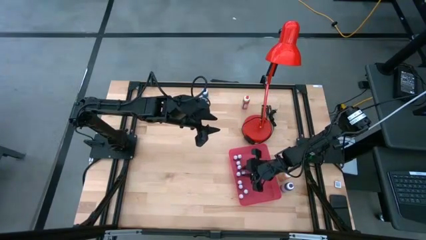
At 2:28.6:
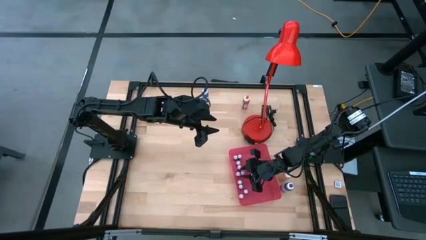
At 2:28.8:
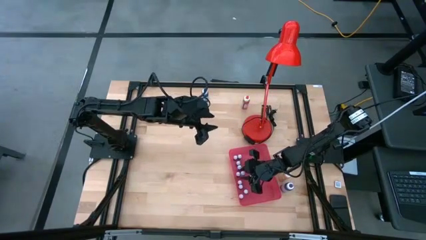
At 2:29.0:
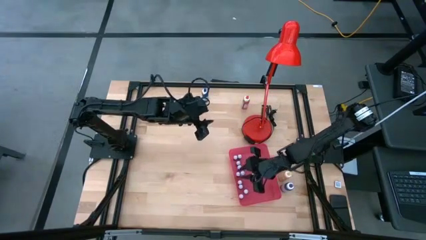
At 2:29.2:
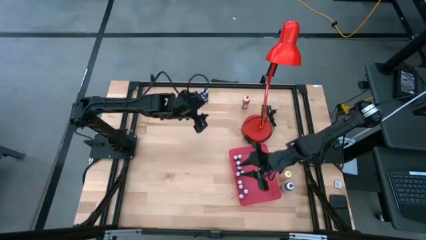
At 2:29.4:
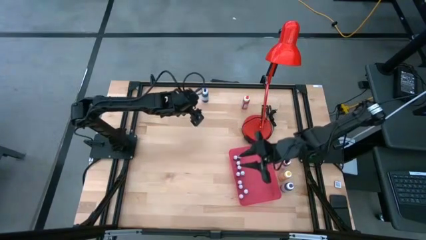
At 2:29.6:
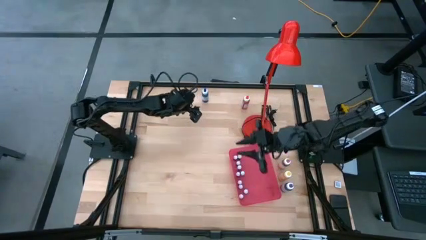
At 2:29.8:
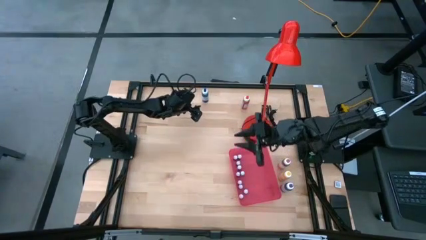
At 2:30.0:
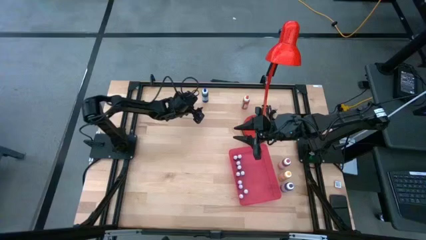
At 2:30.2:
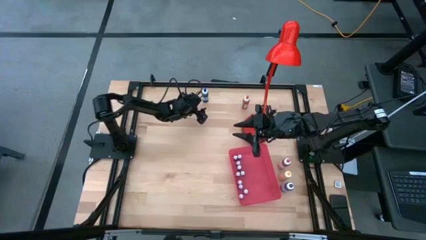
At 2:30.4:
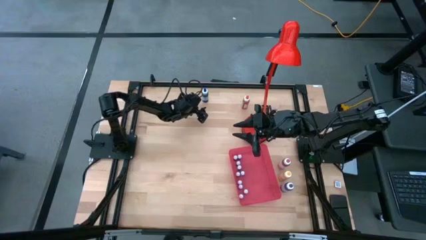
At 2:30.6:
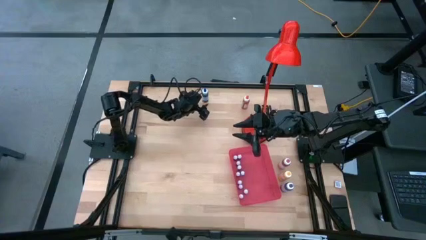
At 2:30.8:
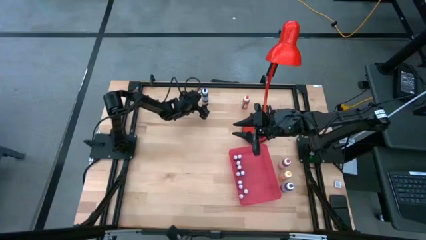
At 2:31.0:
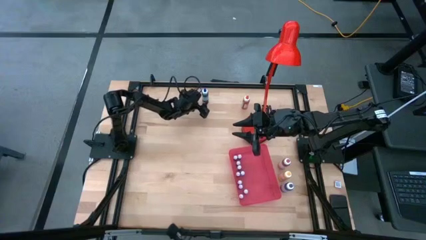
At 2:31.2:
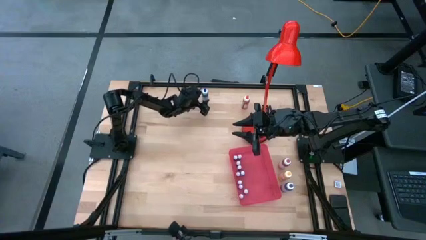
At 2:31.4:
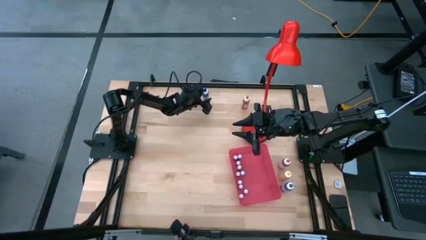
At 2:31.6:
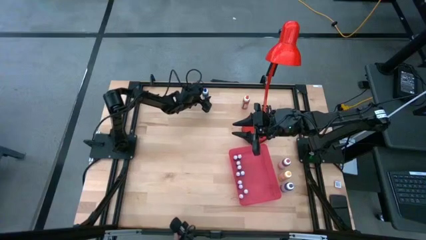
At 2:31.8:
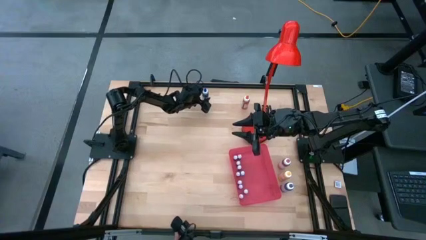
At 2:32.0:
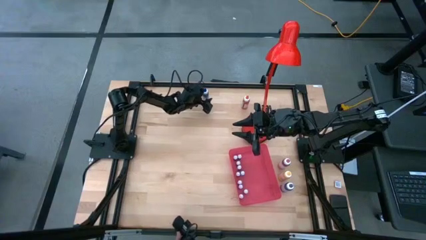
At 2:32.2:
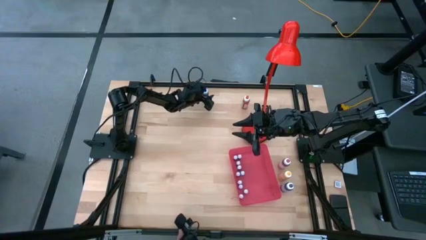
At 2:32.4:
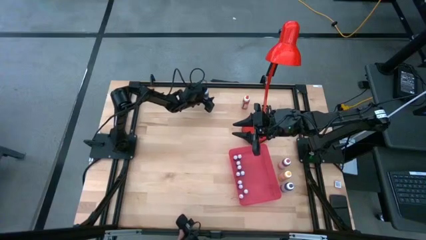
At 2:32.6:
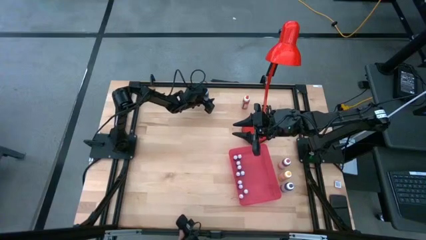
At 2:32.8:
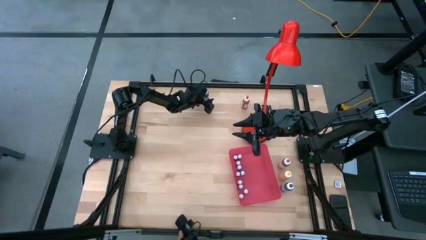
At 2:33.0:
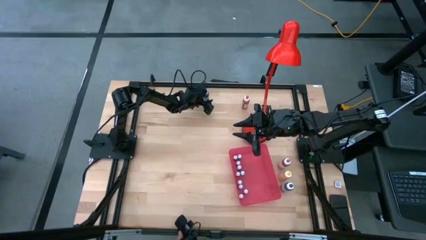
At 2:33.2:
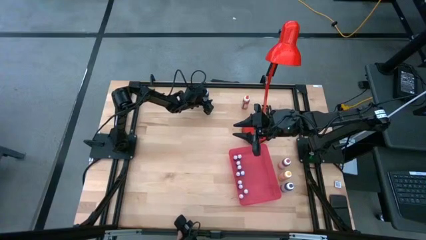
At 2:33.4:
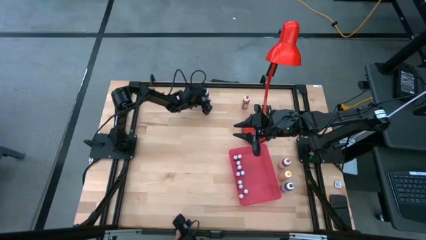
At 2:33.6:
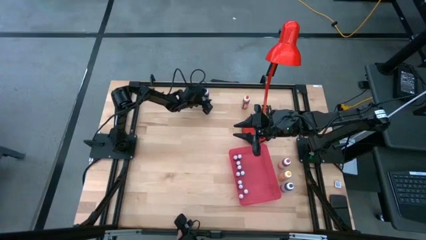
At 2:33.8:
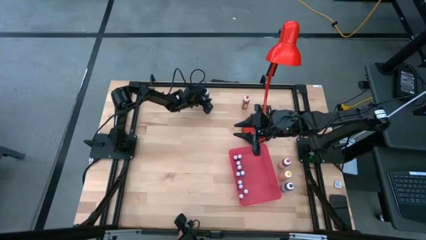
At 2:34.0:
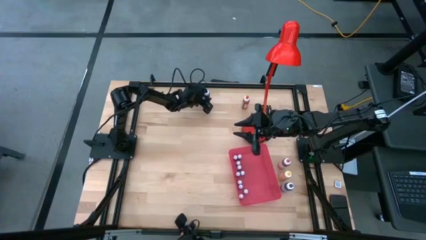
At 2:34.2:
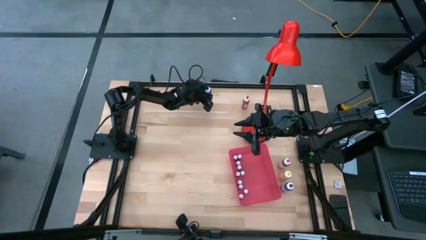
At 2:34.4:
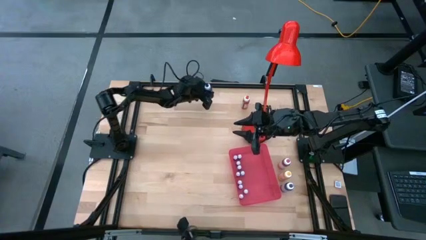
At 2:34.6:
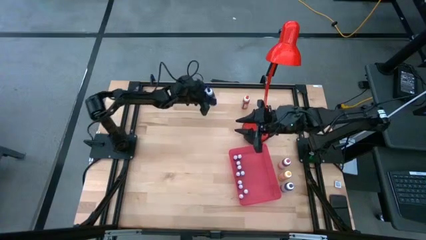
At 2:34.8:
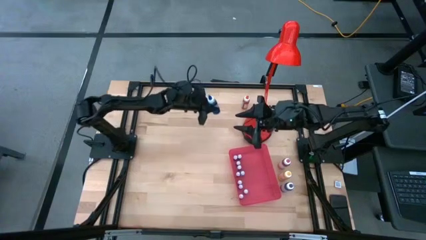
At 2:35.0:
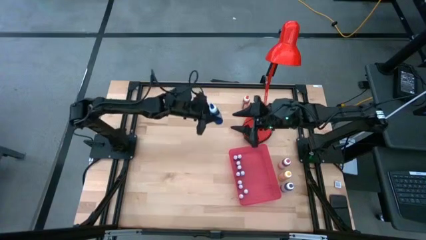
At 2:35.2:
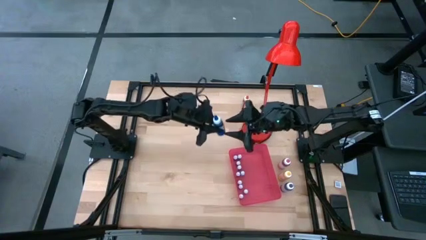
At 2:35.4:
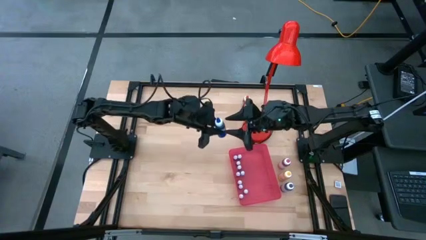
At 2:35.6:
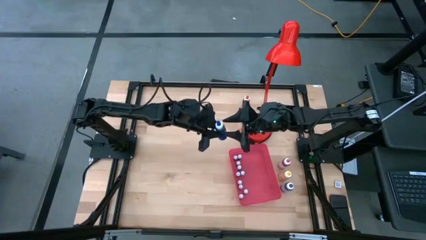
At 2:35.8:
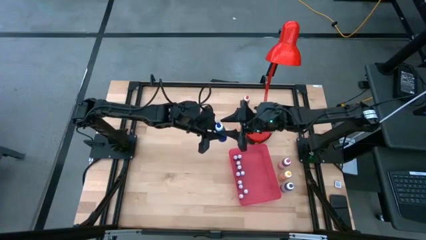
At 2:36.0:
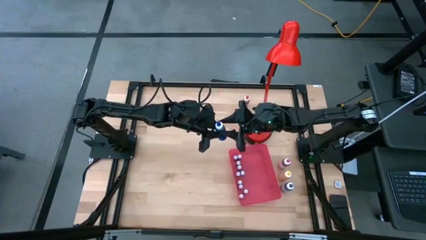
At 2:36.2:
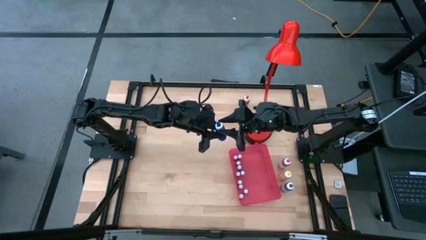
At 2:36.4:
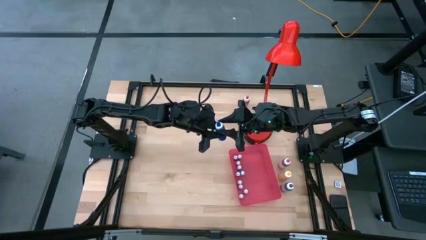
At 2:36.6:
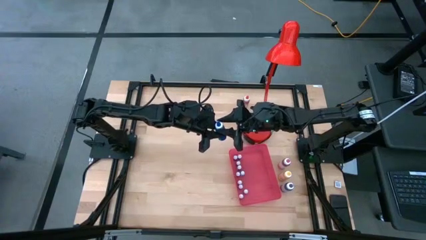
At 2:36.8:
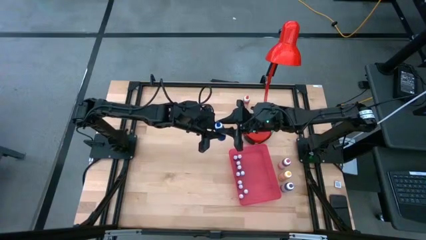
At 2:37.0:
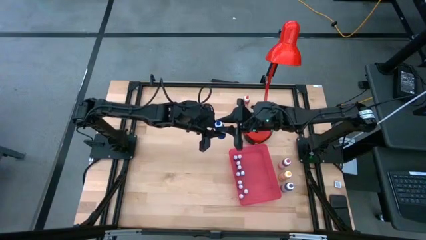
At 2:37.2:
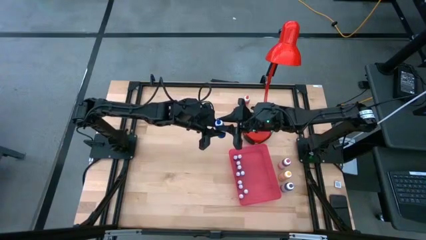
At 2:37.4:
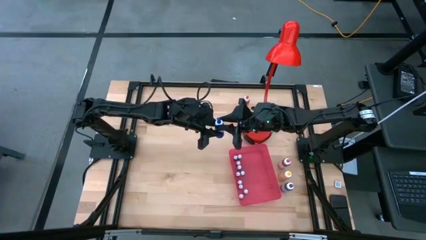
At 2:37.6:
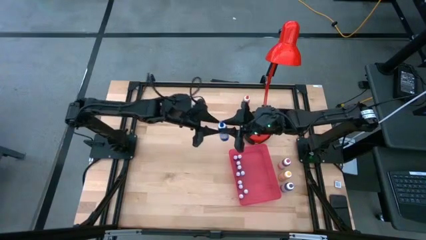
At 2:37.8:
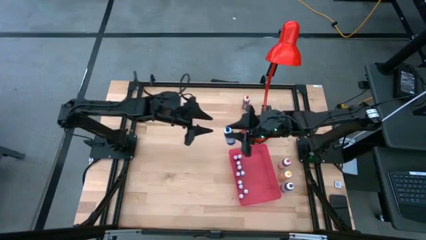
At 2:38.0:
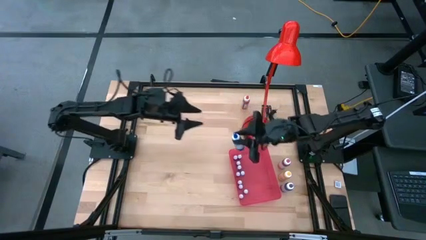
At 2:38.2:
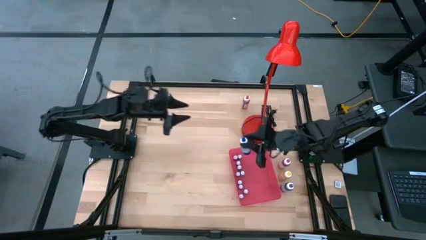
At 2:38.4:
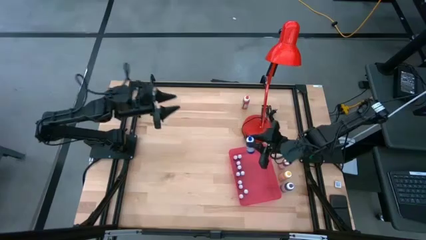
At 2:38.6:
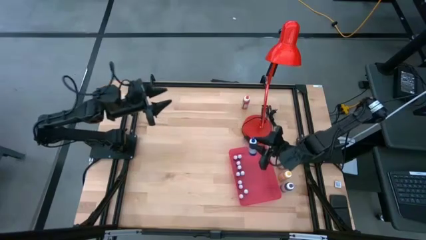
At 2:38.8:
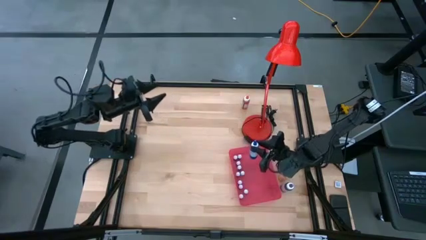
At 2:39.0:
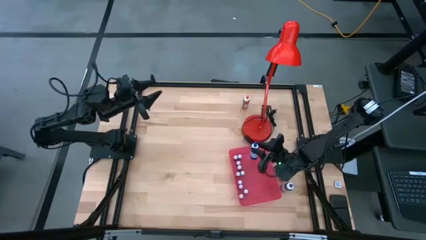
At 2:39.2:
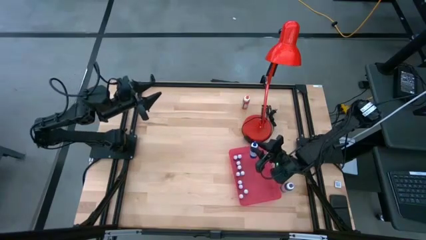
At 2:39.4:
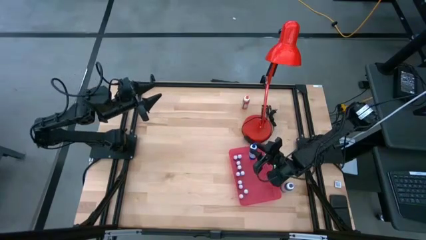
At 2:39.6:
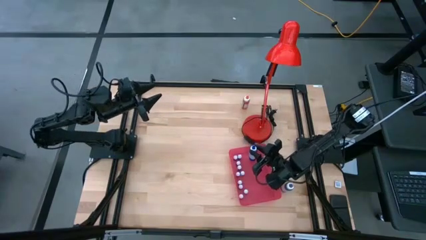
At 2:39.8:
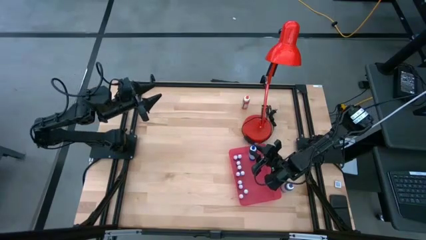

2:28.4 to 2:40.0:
Task: Pick & Place food coloring
Put the large blue food coloring bottle into the red bin
